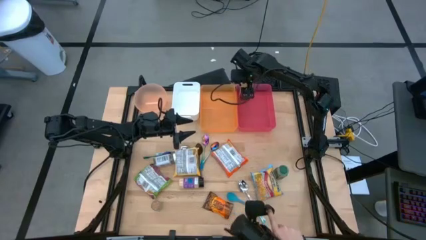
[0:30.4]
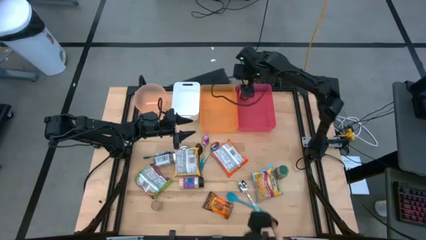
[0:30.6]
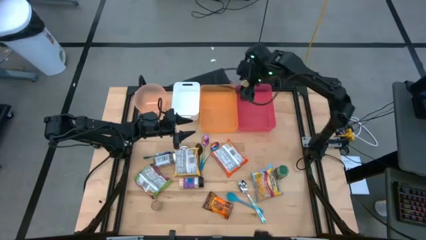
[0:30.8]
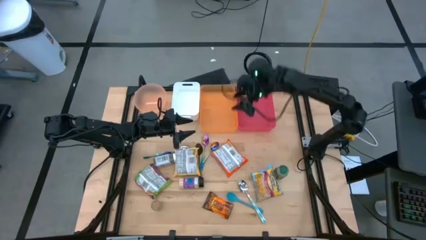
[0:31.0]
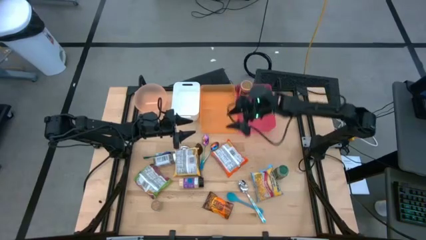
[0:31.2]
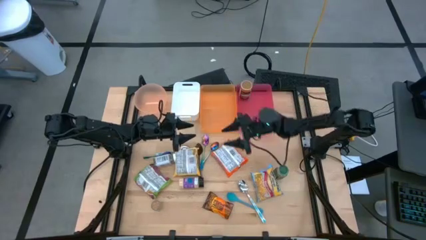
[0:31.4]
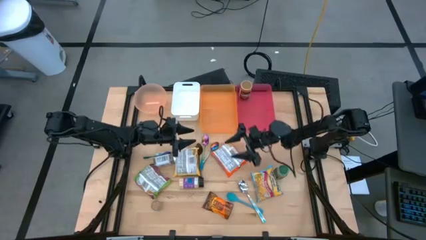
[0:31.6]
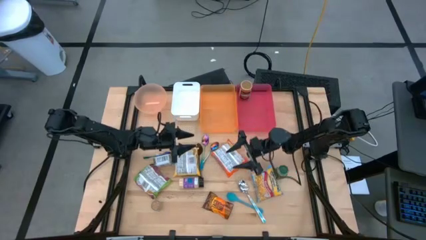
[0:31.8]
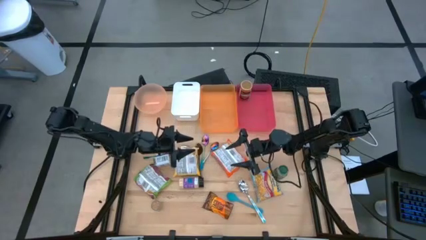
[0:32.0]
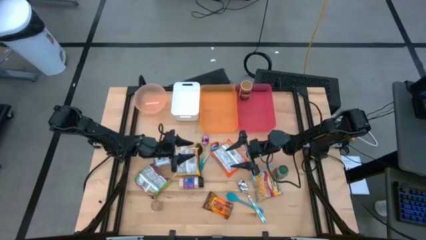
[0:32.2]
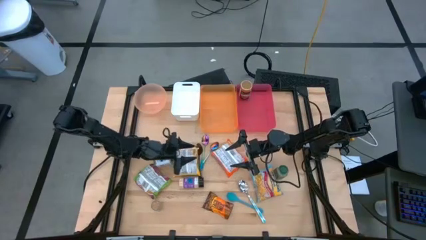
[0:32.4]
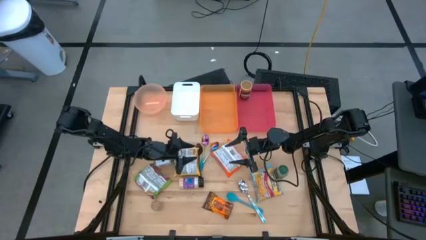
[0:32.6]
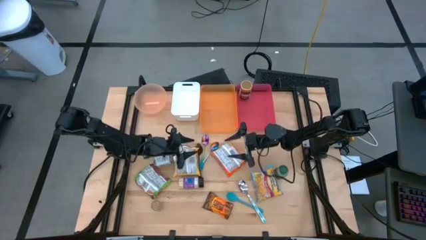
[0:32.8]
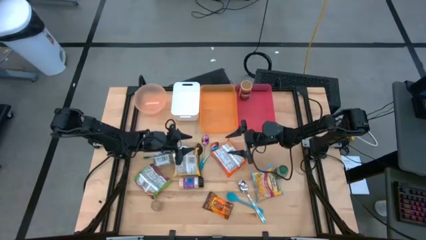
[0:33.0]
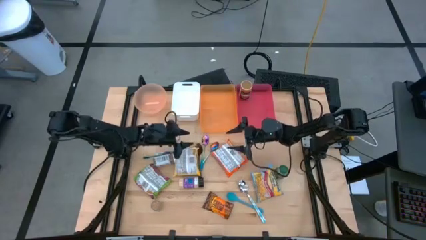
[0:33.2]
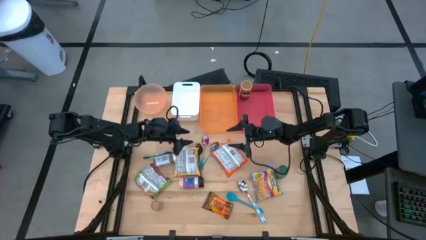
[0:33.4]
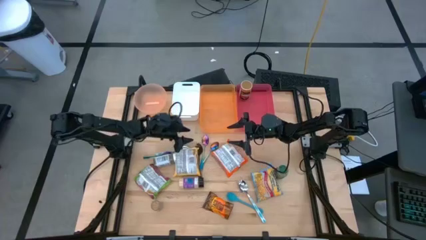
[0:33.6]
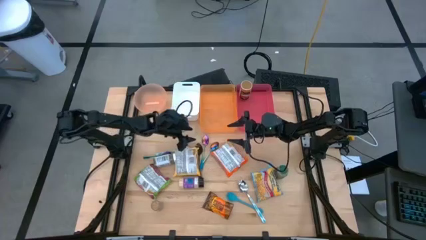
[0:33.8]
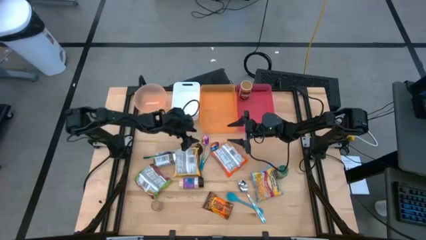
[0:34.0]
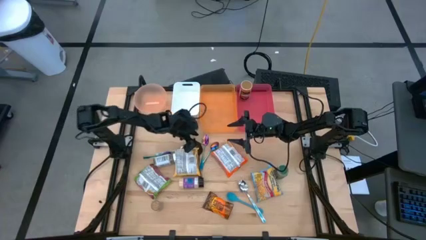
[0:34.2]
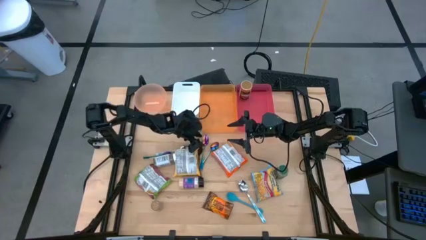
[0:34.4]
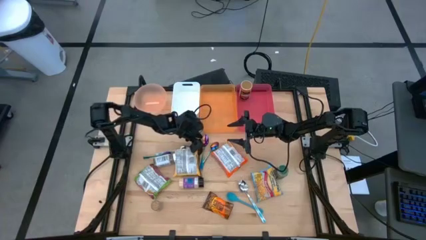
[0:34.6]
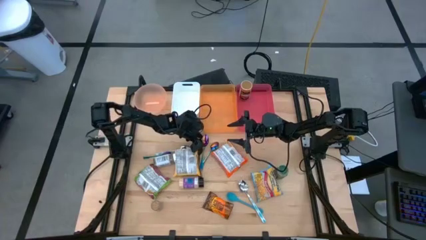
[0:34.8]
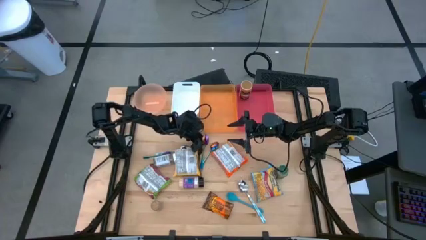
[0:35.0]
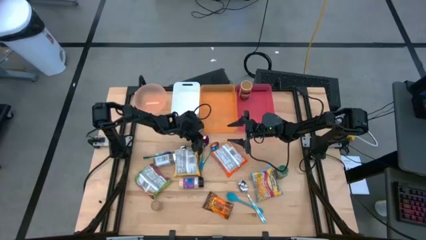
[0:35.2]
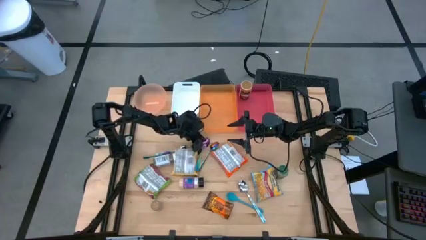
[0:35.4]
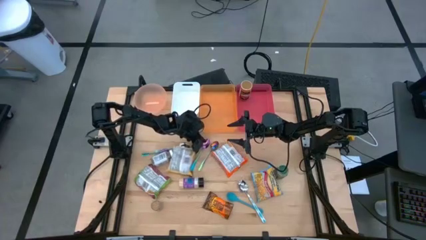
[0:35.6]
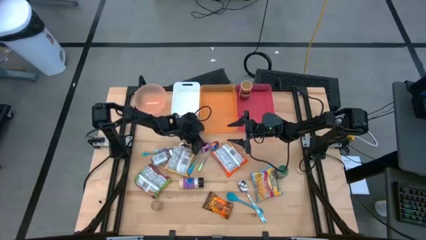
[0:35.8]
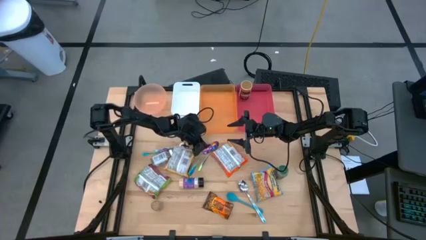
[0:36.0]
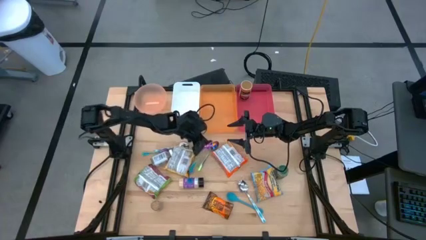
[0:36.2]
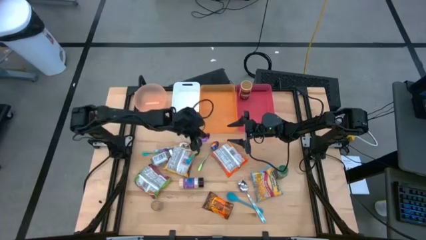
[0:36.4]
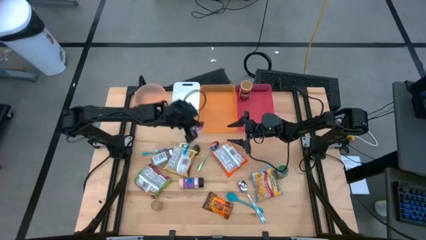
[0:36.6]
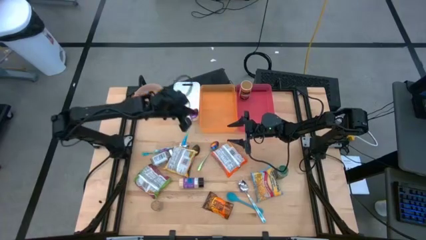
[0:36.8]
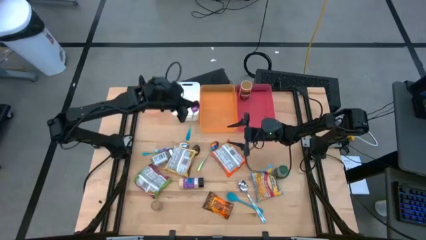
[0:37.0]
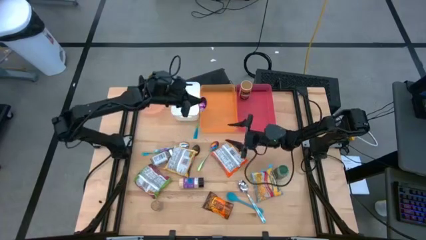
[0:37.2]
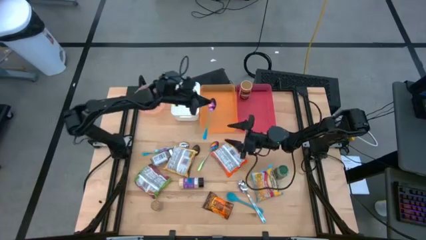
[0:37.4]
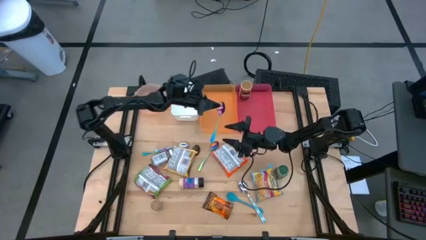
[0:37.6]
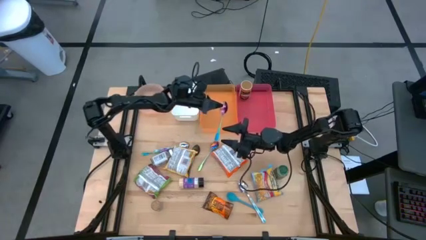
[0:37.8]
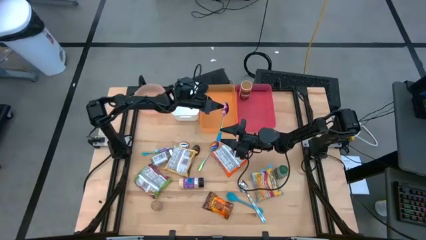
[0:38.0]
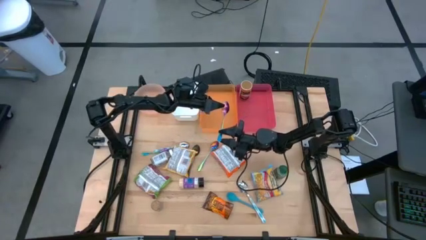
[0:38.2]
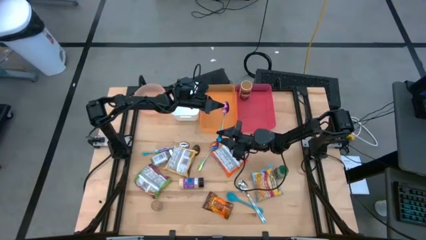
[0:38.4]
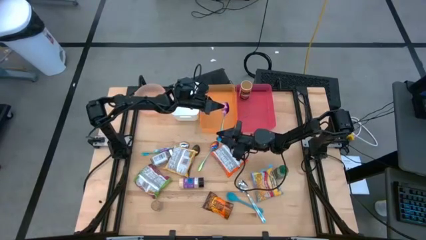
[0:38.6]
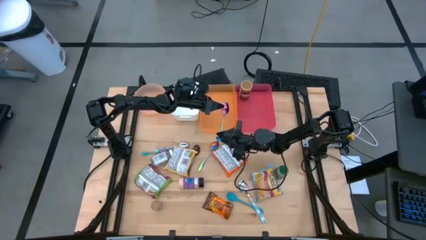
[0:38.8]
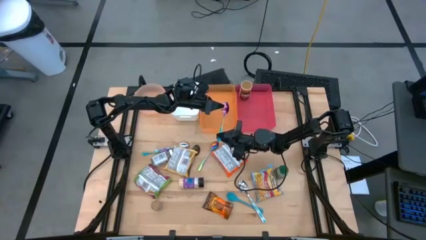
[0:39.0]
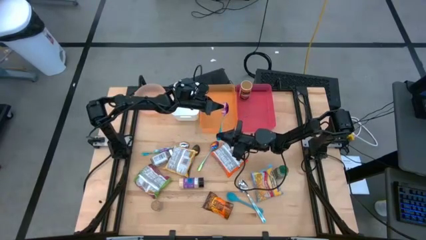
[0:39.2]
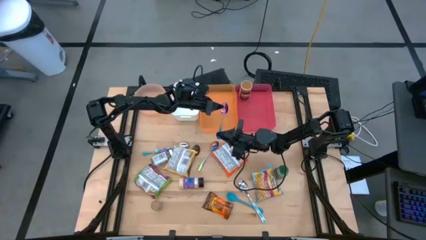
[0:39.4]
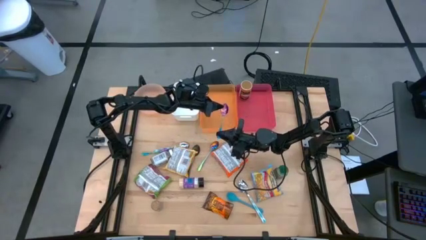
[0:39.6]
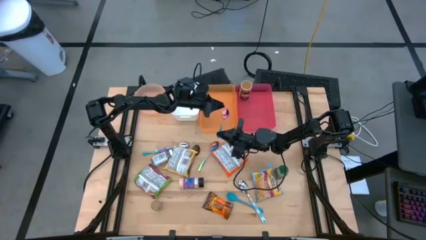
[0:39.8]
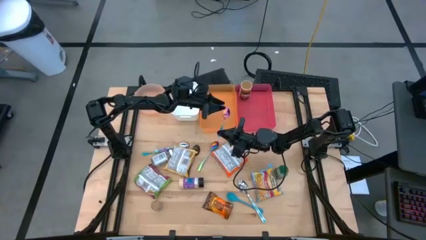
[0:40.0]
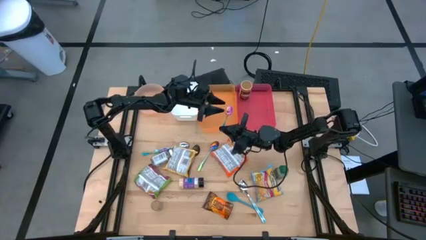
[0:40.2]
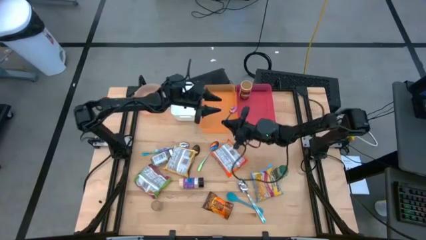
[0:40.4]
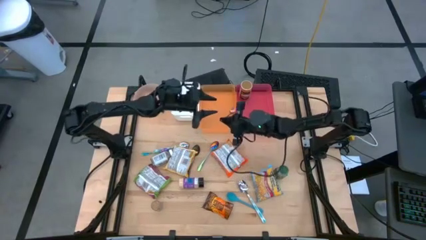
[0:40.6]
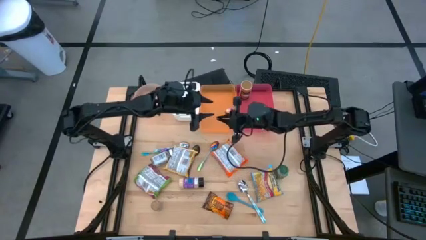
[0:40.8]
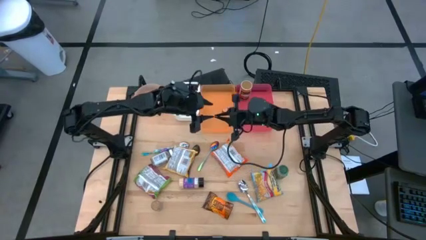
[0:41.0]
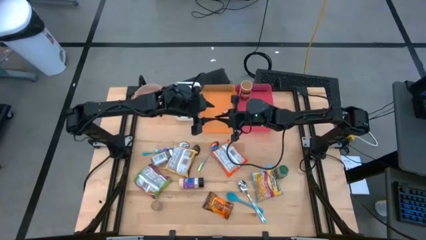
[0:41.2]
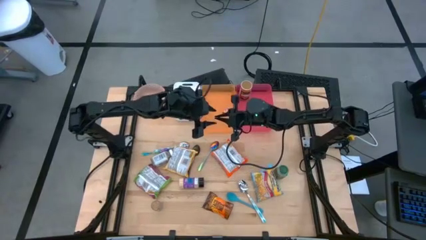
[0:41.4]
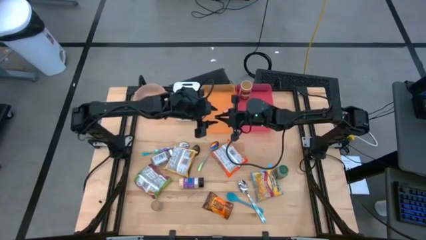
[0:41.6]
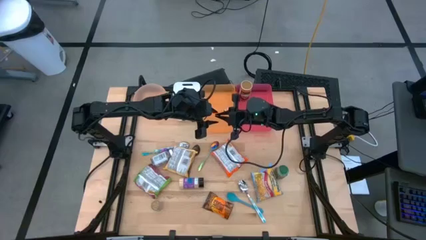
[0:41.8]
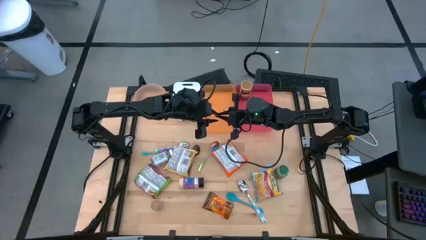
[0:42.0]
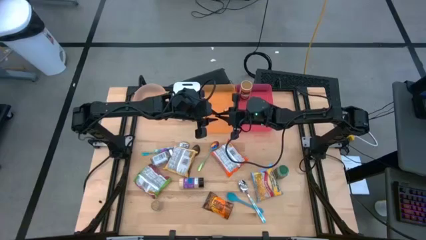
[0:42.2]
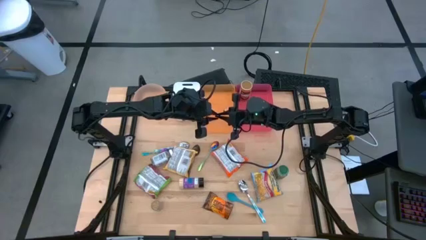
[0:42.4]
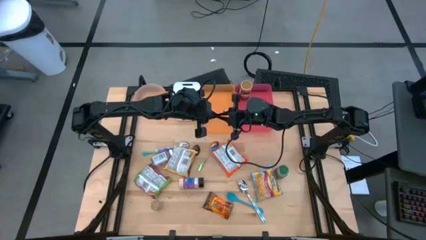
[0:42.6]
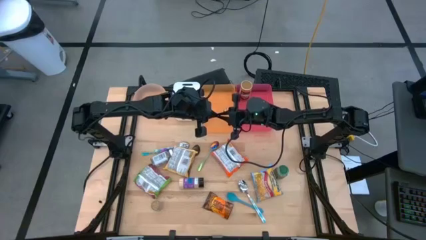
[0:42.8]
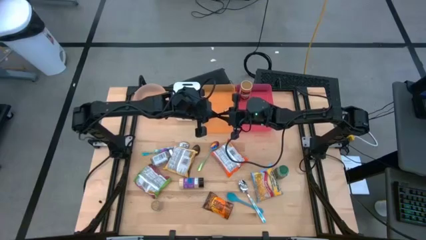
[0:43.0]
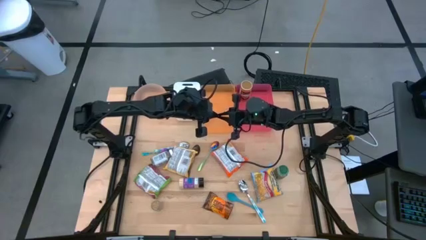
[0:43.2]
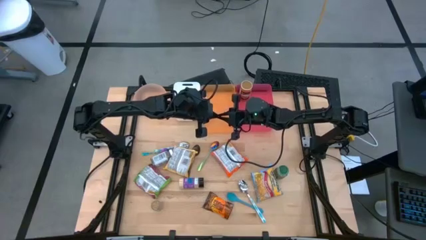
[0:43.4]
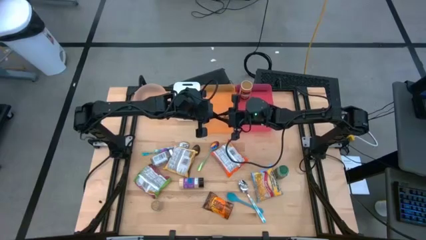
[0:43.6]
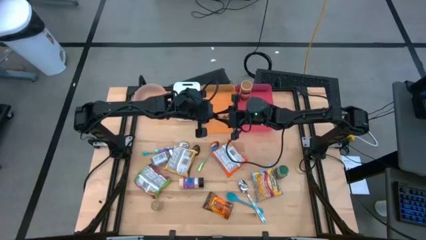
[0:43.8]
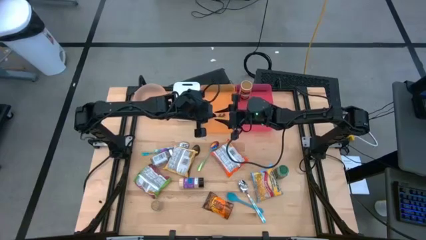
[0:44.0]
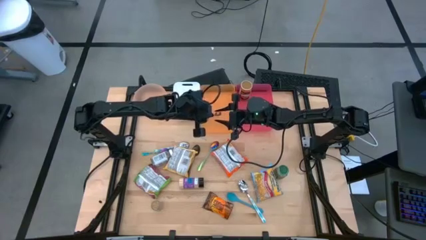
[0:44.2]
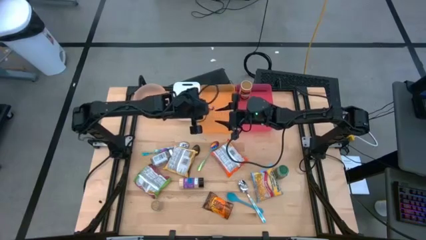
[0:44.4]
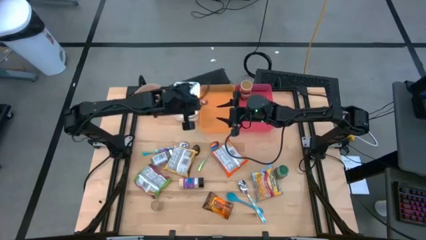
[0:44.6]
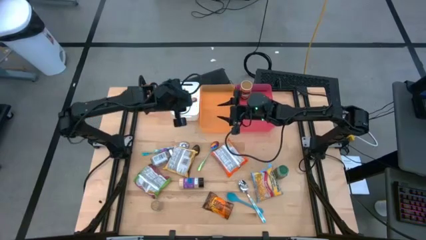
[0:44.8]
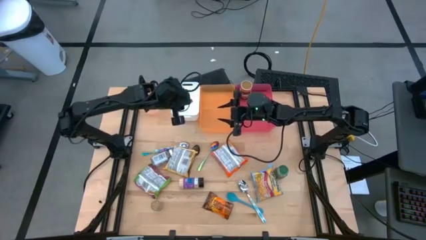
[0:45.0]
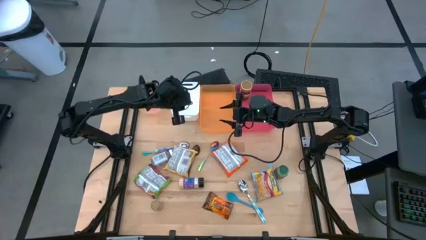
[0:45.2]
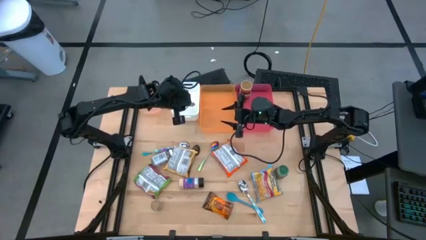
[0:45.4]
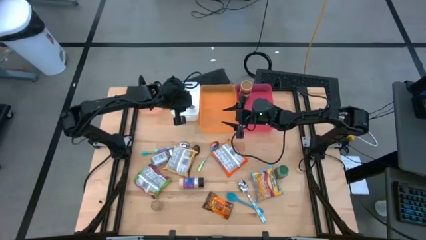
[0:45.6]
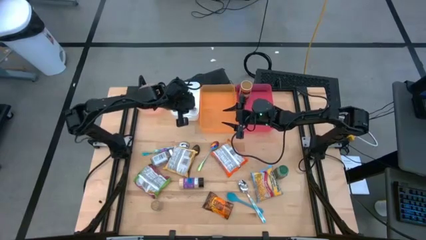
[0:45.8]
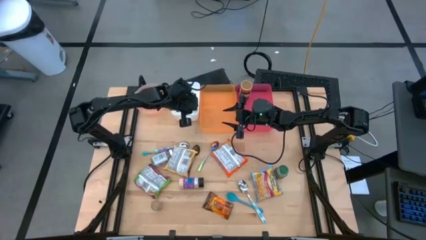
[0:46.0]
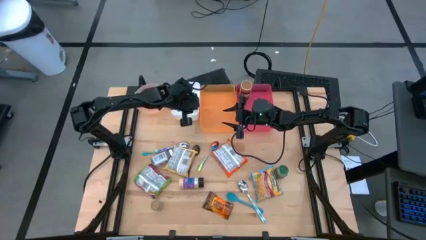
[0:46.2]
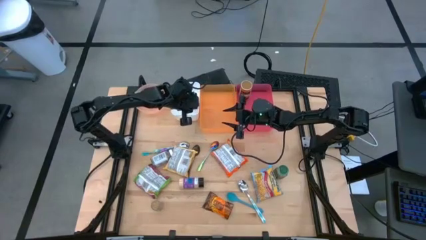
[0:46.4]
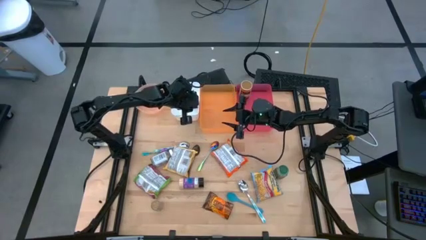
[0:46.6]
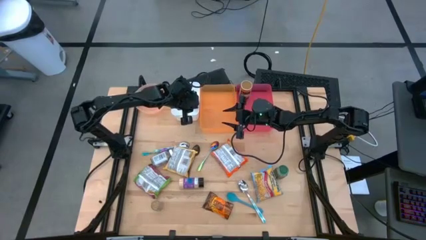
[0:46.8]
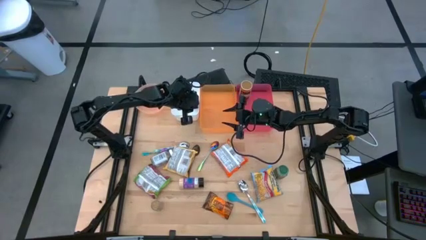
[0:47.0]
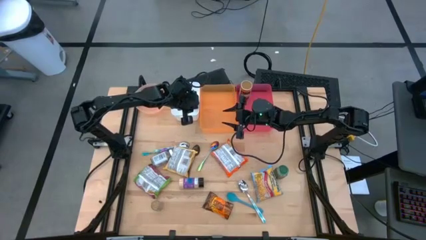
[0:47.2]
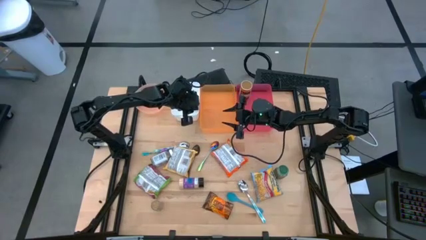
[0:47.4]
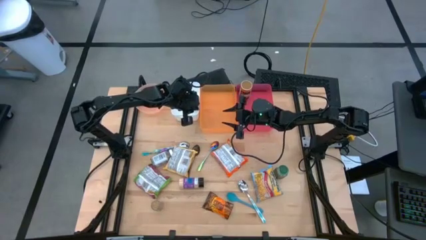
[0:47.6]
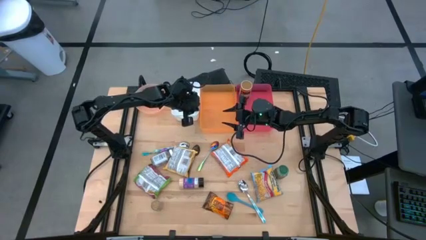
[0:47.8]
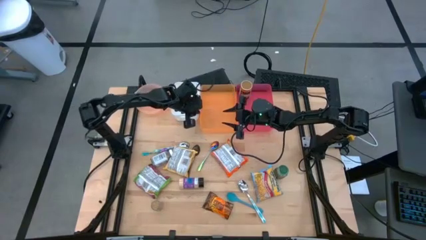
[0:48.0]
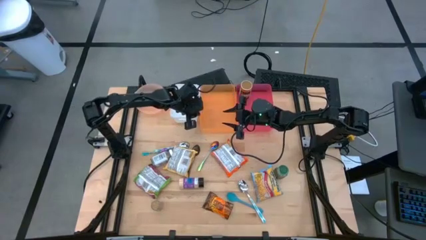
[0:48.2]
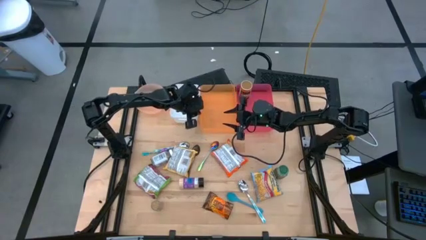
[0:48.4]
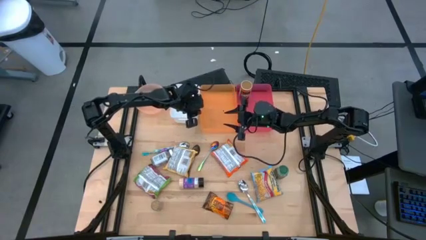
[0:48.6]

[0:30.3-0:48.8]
Task: Pick & Place Food Item
Put the middle purple blue spoon into the white bin
